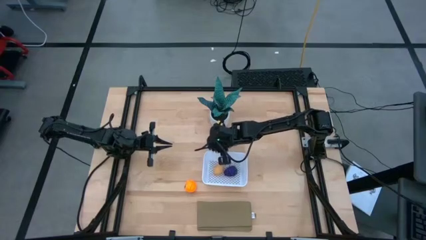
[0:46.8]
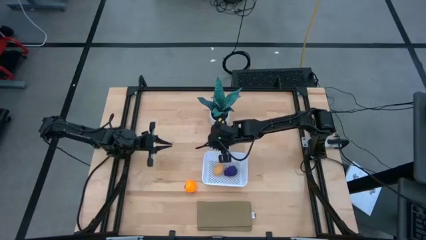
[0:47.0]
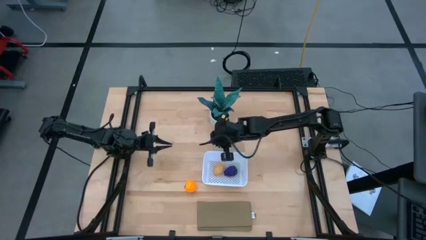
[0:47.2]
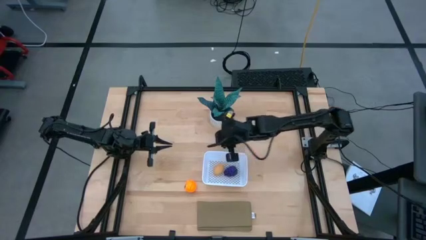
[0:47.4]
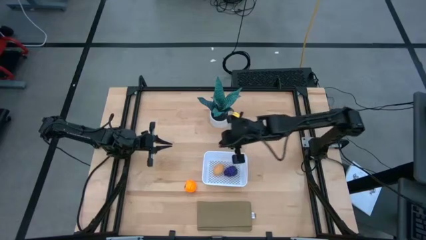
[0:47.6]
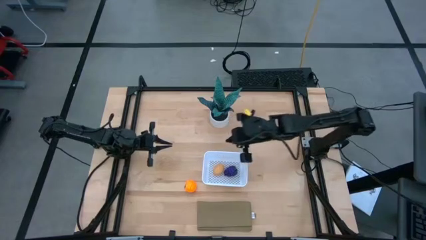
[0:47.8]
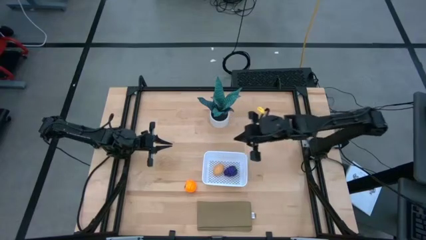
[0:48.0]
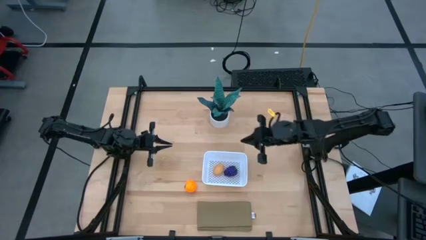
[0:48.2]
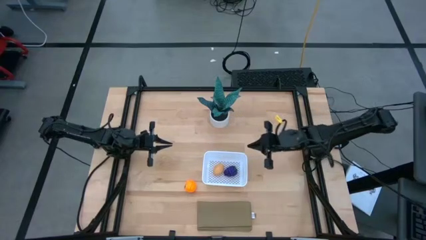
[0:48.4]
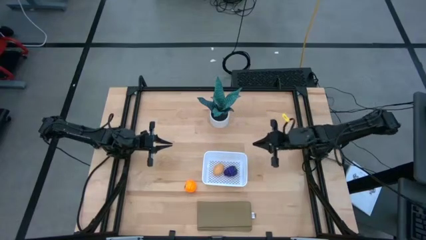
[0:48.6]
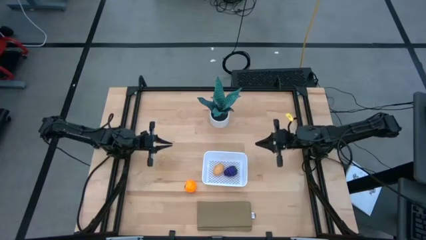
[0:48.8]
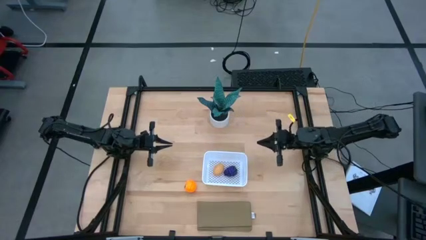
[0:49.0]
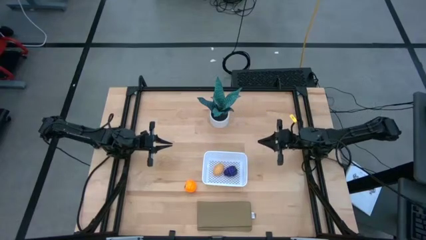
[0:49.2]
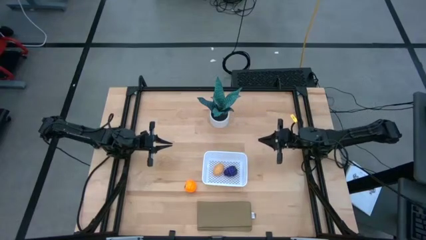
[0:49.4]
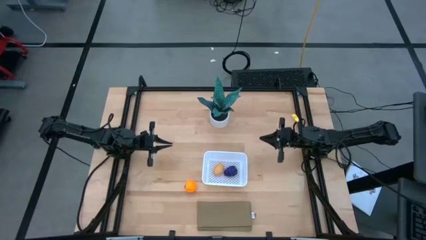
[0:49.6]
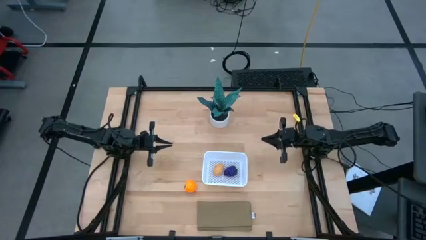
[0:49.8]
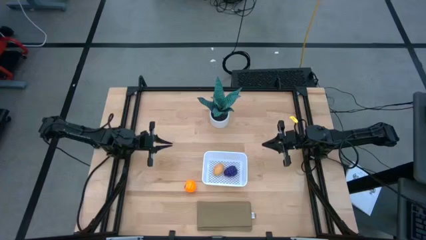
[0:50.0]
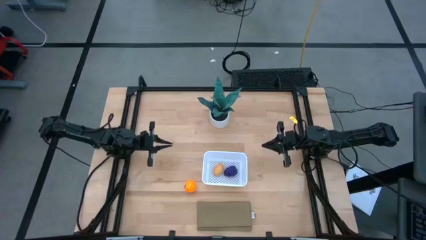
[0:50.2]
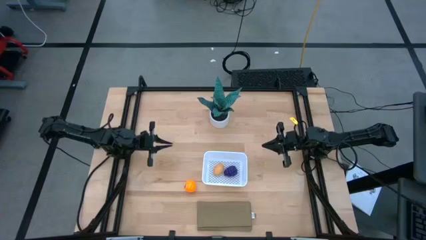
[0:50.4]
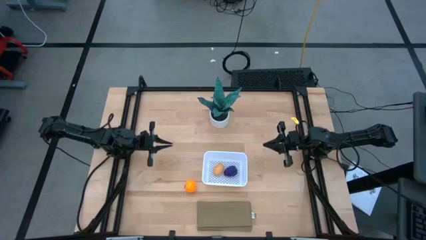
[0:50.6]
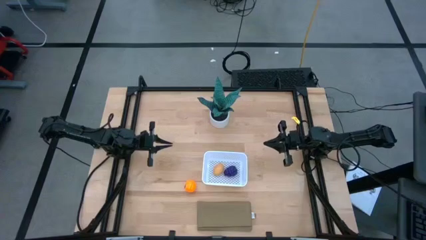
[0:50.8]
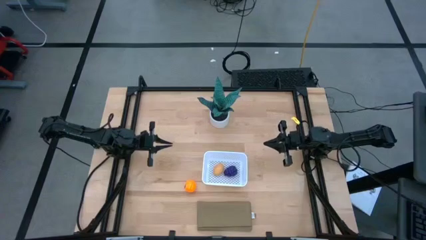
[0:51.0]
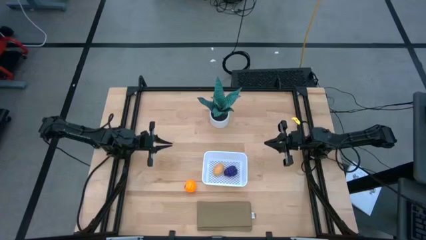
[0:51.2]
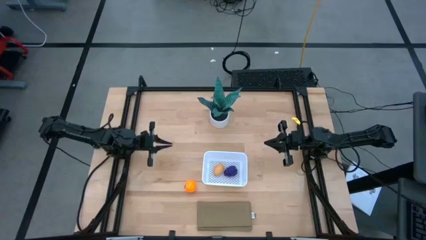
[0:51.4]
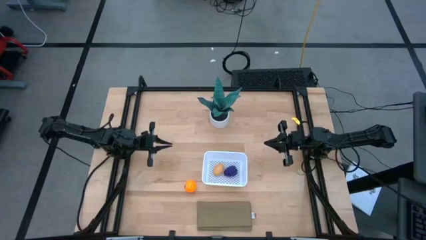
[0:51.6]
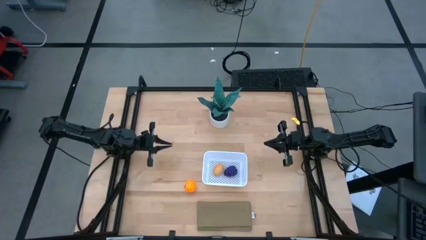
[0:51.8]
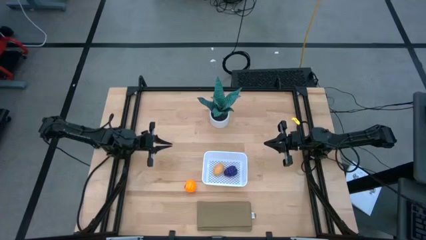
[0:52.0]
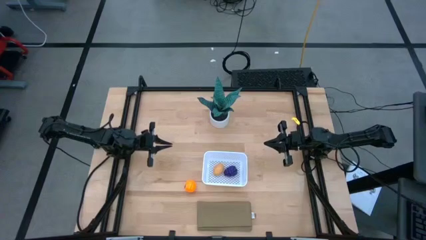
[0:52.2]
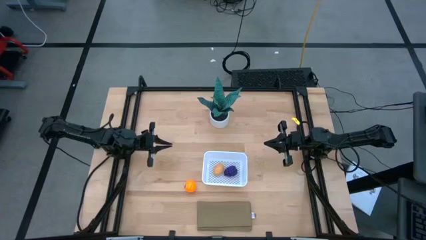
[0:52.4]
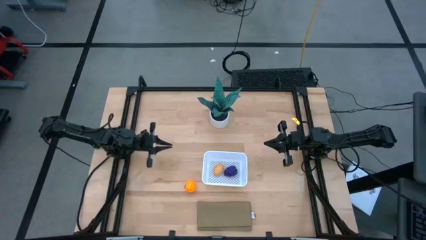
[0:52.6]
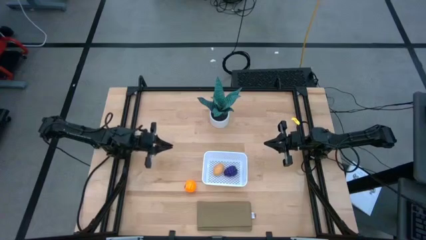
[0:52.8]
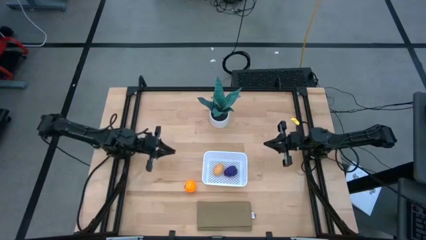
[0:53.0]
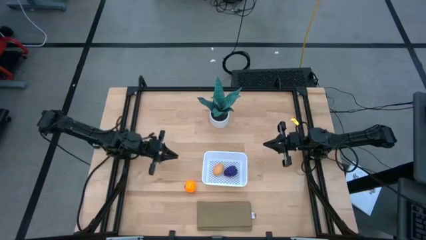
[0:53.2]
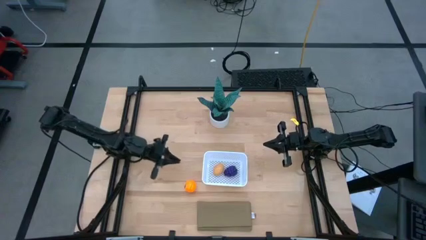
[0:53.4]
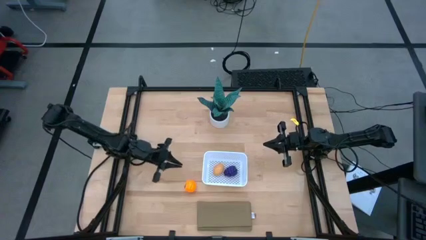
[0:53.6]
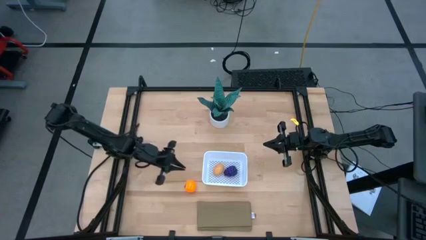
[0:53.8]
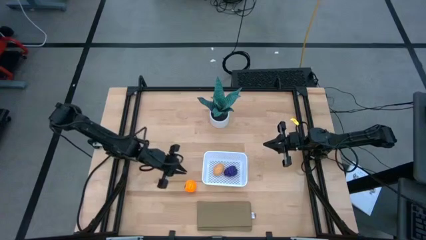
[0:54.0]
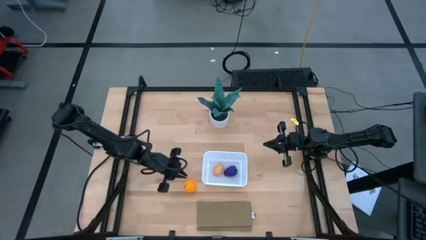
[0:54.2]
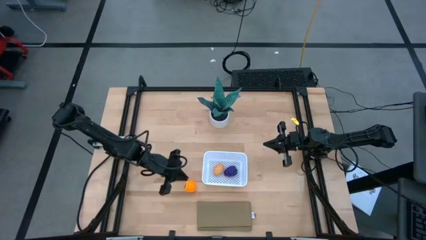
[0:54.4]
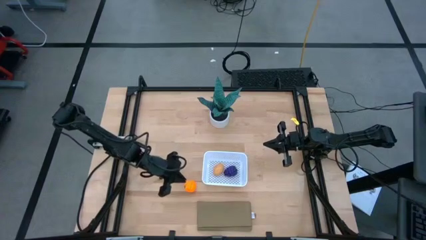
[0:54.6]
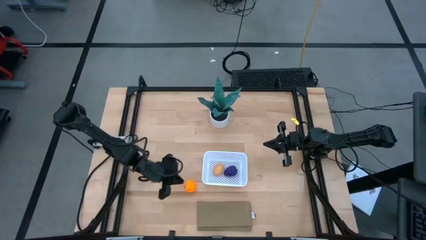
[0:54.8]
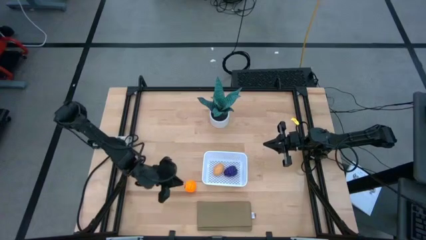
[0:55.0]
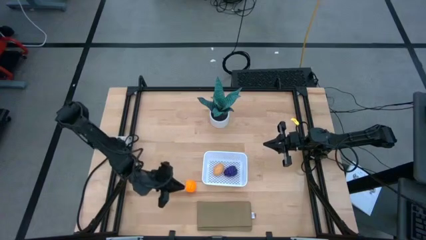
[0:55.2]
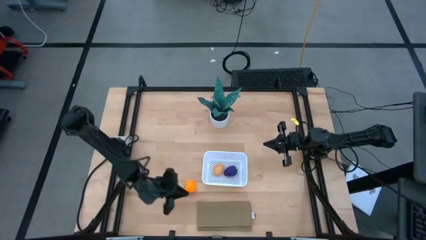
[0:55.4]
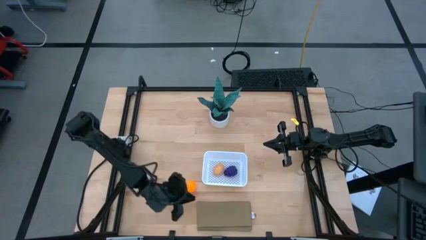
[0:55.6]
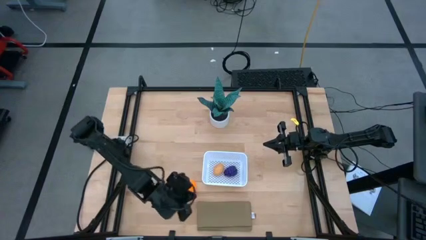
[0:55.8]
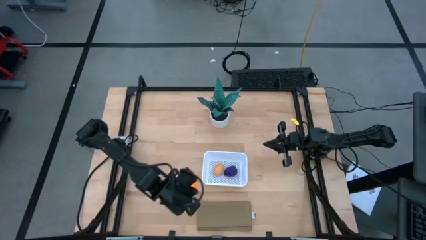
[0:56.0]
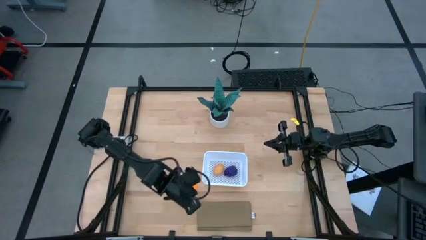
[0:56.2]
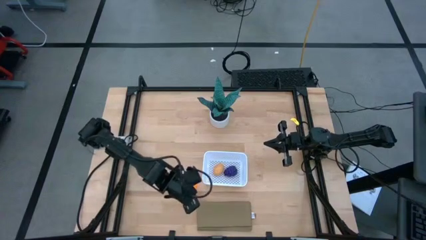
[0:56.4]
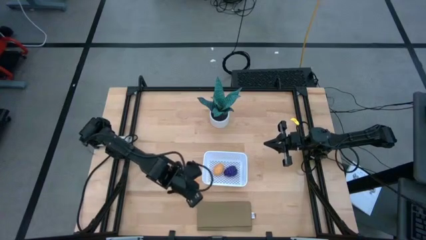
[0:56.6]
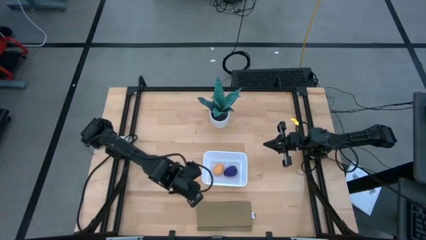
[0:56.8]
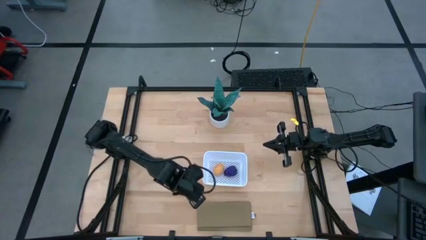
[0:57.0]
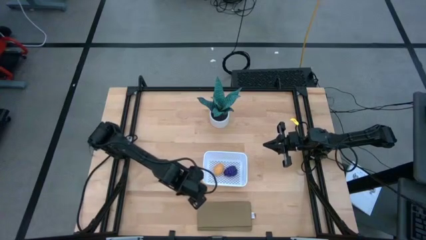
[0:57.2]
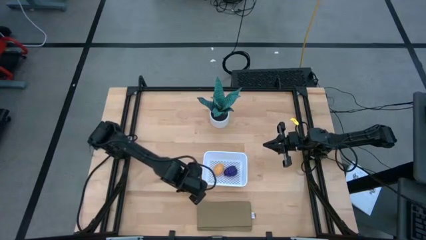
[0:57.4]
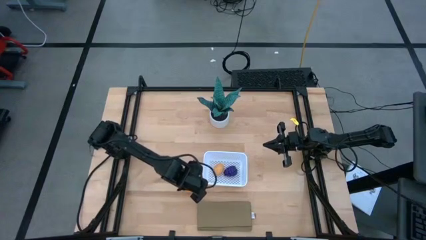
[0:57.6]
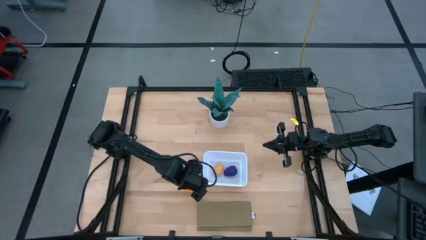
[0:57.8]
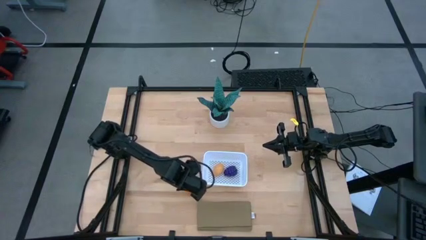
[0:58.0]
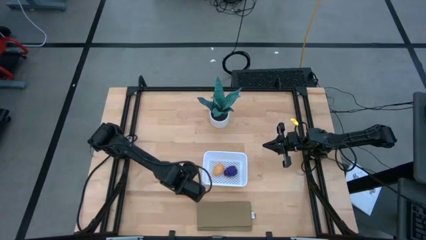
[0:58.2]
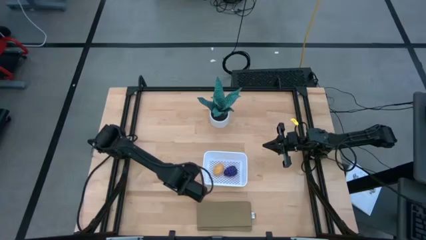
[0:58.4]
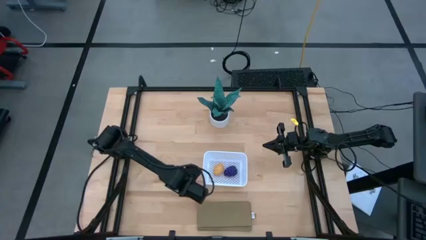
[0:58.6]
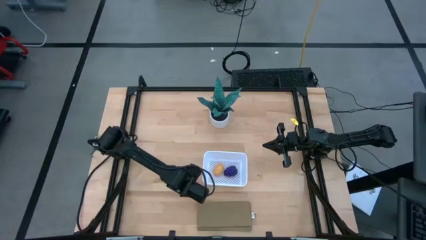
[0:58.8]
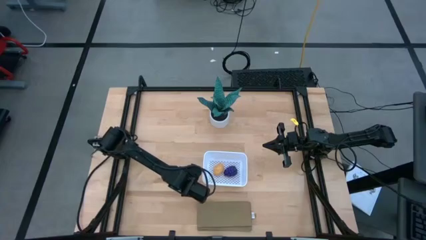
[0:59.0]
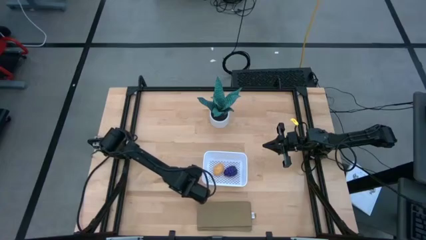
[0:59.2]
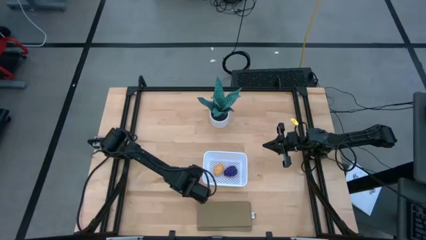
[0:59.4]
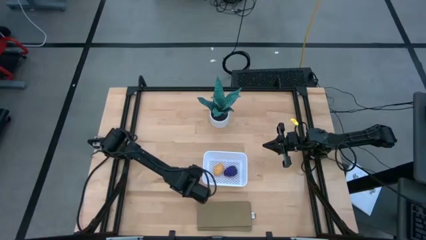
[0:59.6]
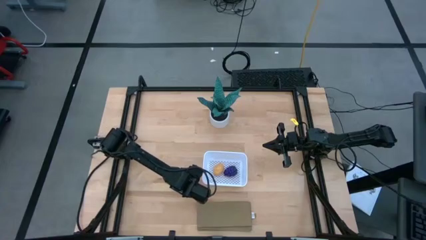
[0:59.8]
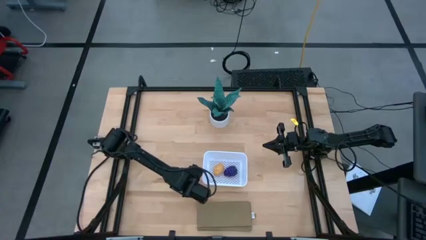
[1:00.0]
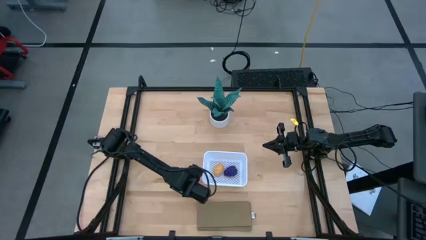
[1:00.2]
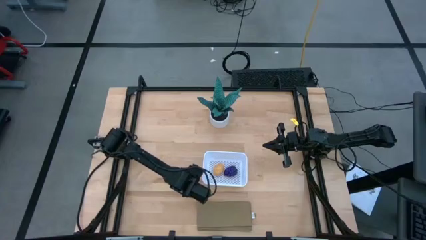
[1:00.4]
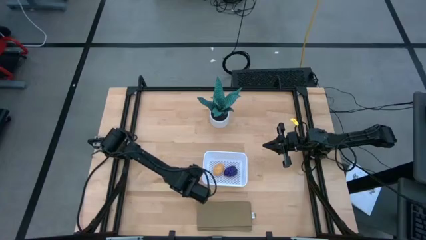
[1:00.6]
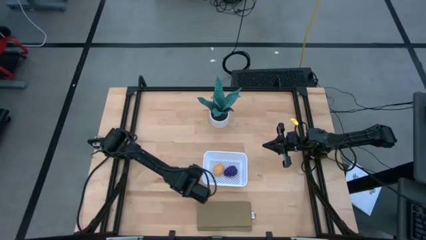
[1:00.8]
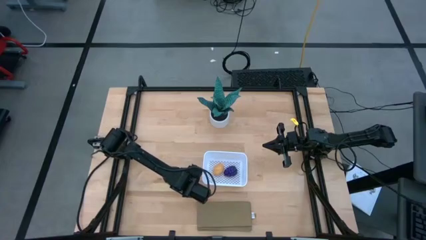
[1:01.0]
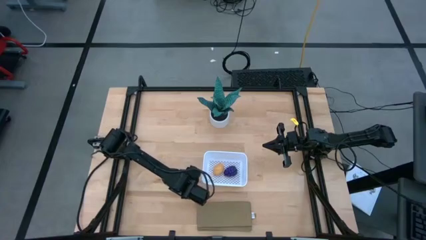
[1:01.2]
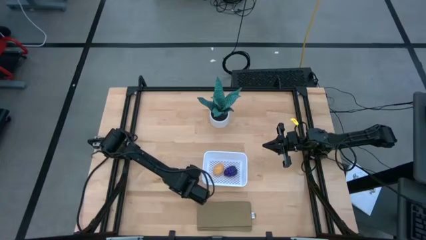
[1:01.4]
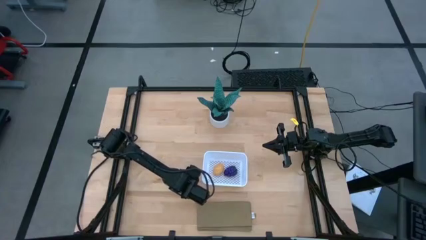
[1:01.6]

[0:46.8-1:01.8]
Task: Pick and placing Produce into tupperware
Put the orange into the white basket
